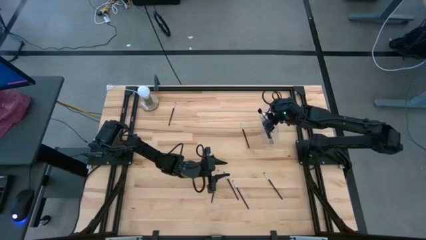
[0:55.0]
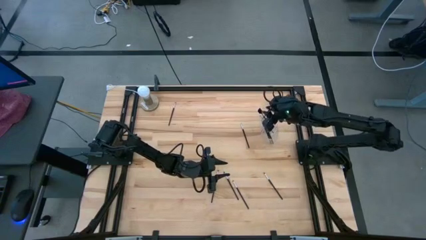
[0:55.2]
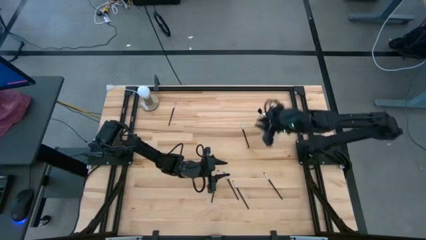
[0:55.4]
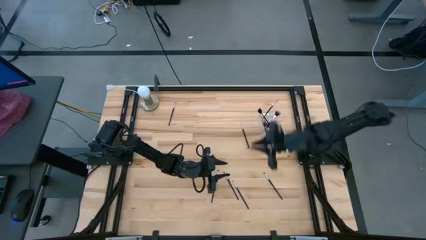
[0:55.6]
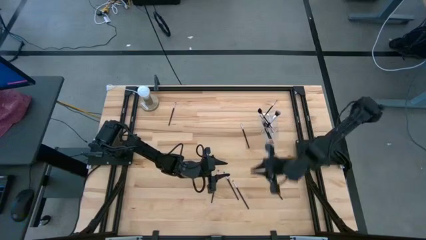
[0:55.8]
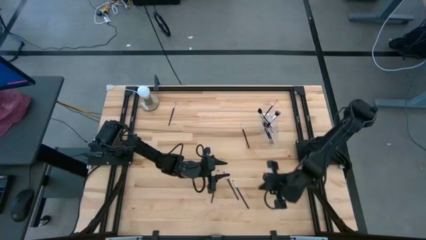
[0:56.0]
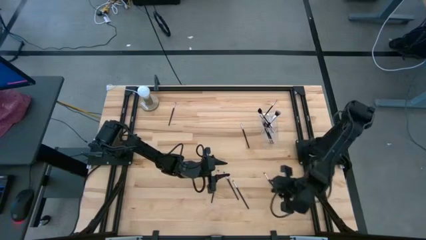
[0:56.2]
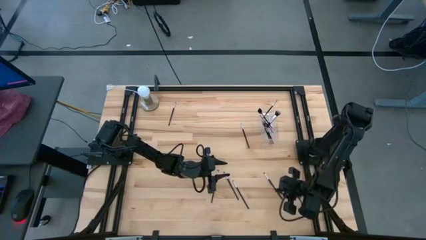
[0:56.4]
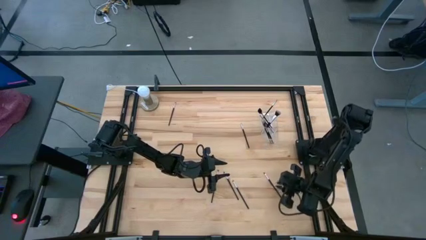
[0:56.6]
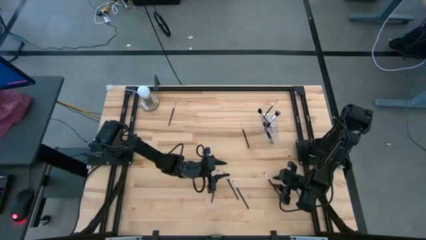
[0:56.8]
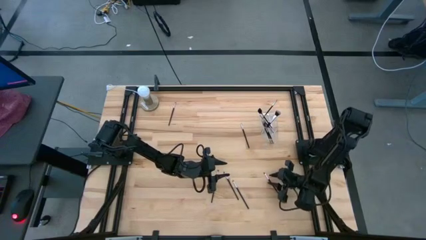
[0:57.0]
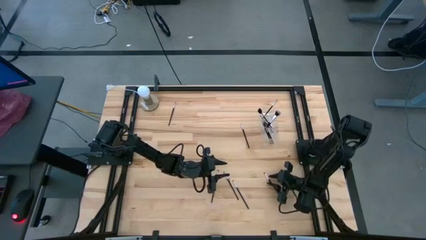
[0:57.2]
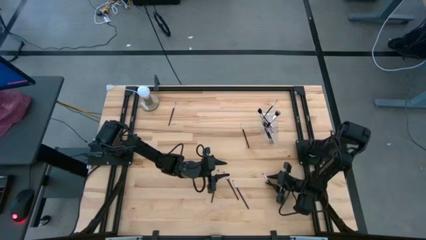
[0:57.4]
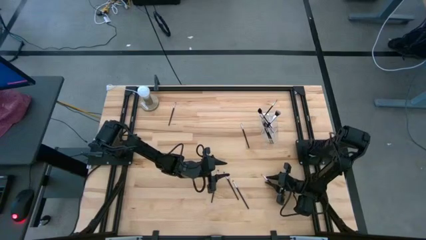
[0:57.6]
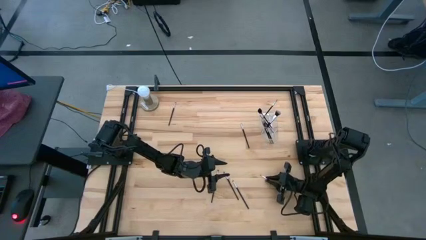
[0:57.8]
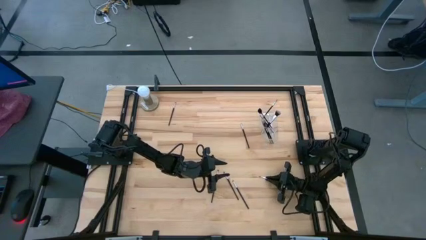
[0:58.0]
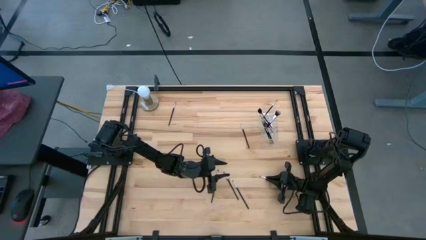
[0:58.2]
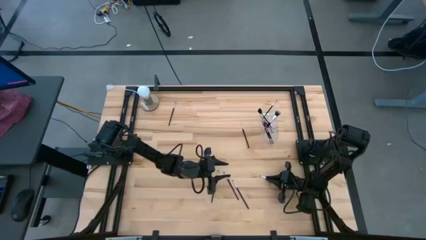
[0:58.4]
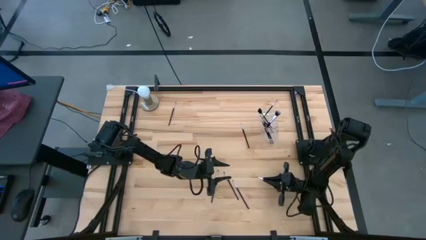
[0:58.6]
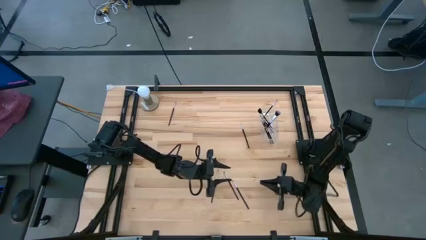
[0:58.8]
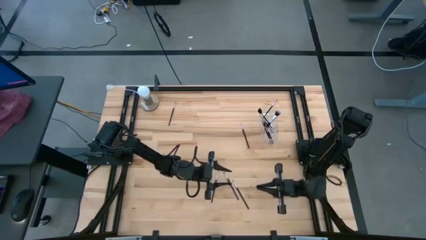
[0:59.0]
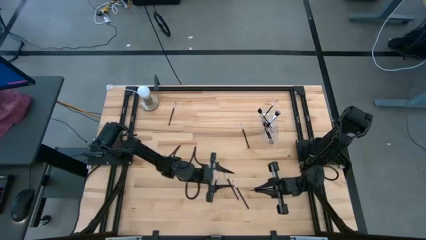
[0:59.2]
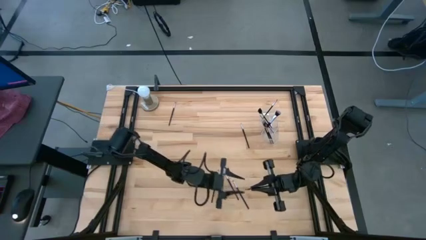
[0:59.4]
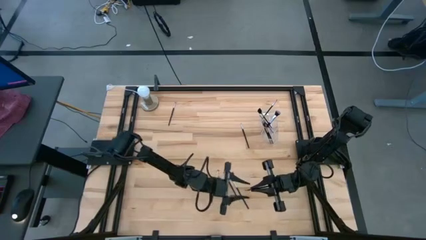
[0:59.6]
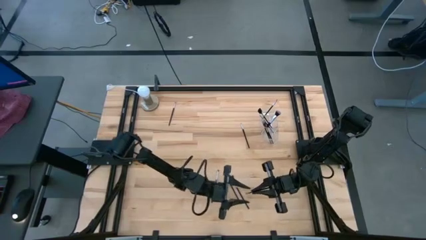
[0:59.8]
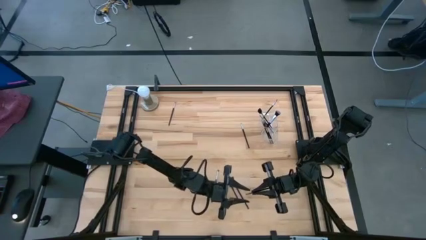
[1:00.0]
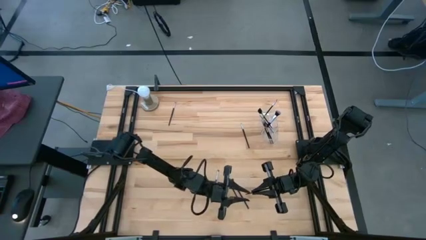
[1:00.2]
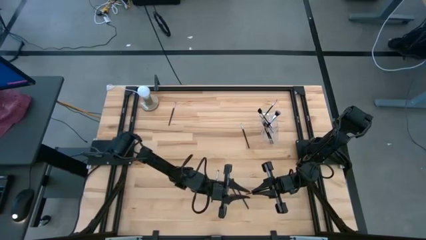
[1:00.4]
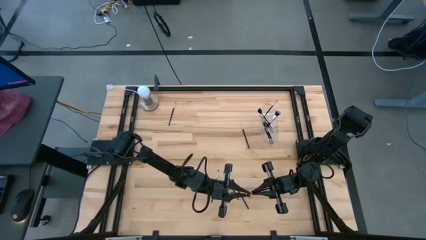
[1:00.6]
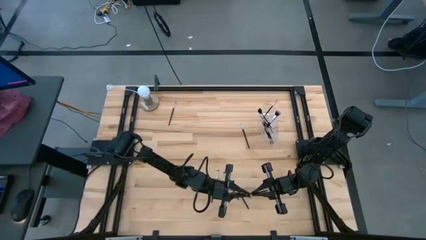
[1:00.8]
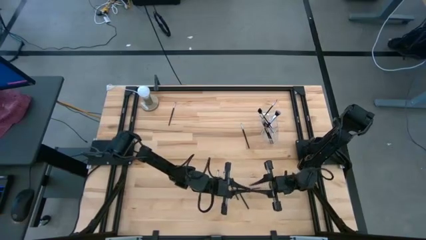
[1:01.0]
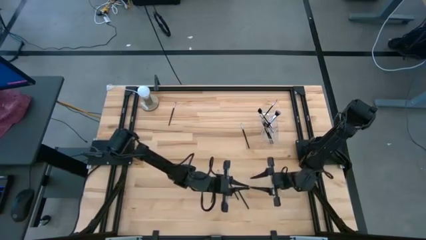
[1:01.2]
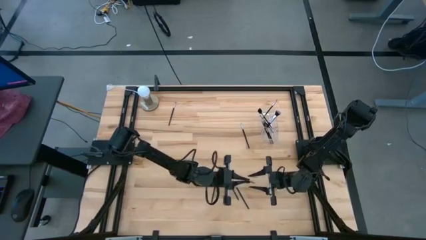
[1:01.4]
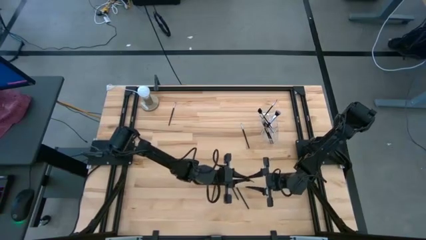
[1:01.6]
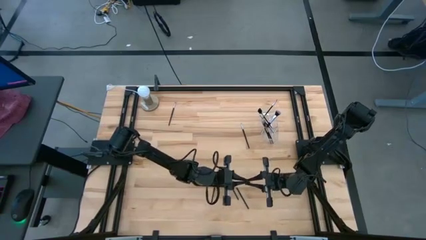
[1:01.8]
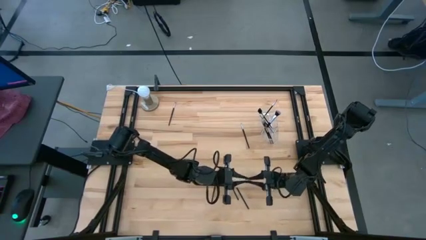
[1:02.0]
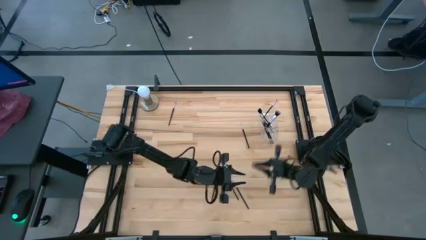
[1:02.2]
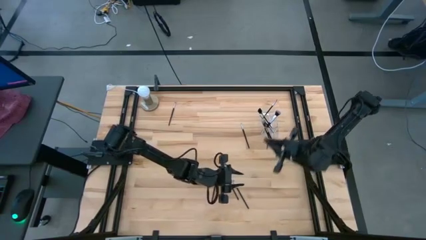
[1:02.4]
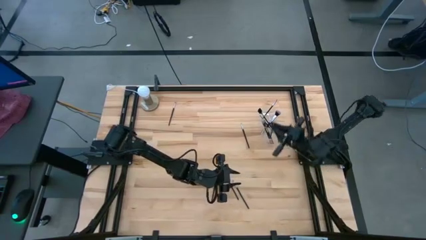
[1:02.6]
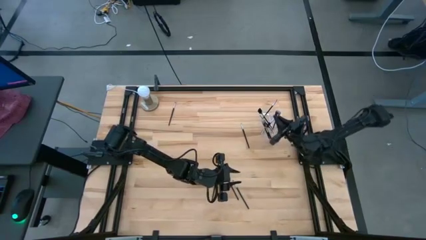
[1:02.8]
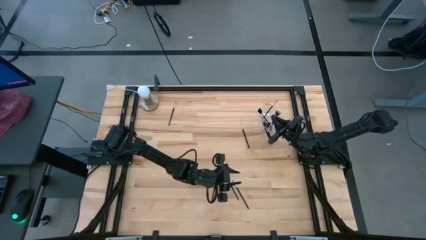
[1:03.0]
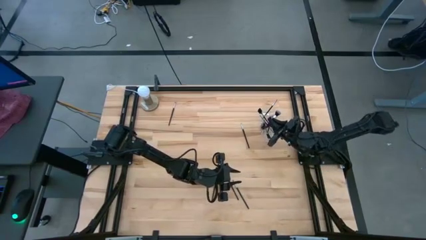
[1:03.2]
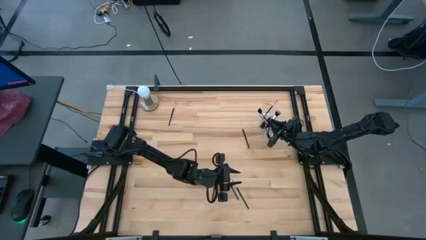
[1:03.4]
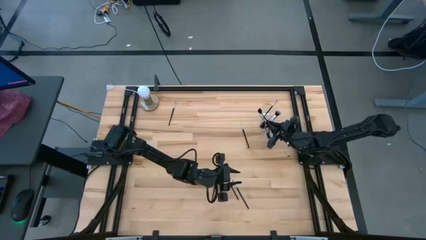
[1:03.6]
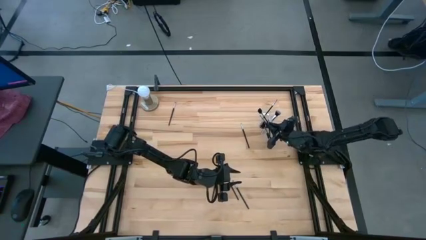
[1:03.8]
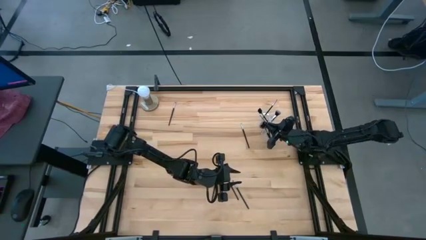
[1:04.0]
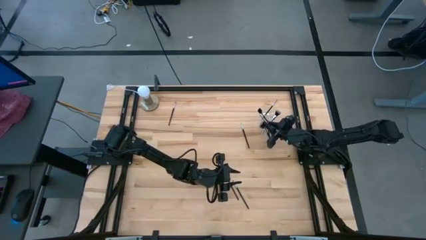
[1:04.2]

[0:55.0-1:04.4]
Task: Sort items
Put the silver eyeshadow brush into the transparent organizer
